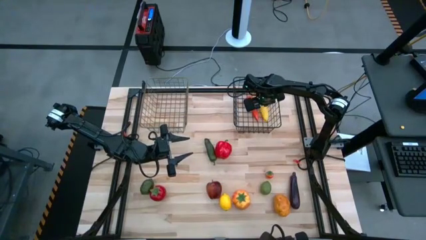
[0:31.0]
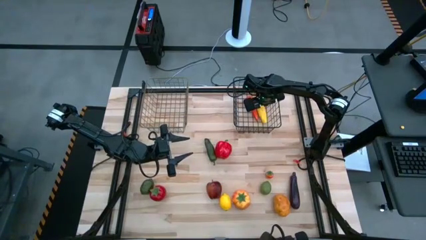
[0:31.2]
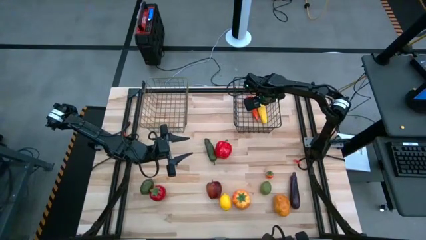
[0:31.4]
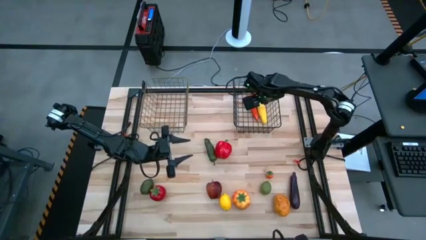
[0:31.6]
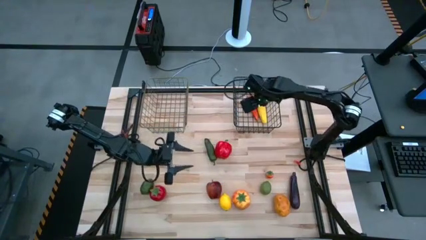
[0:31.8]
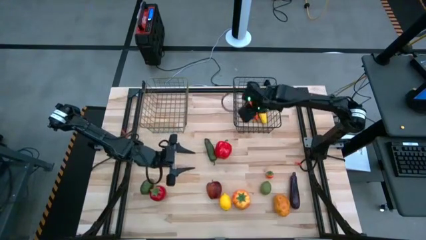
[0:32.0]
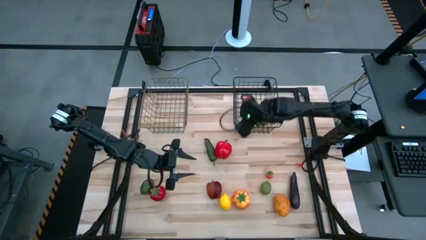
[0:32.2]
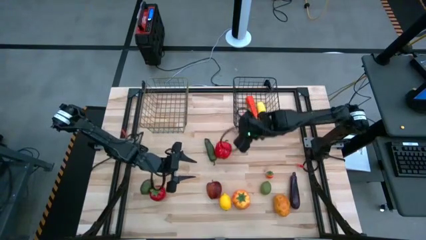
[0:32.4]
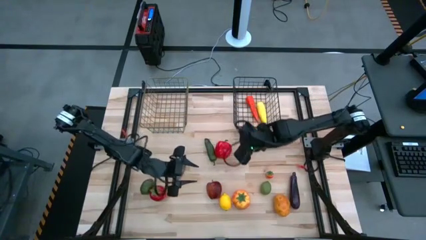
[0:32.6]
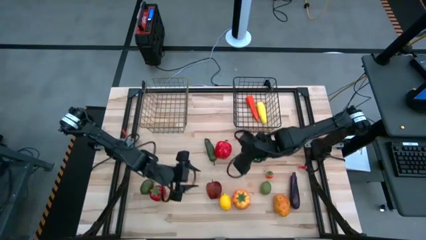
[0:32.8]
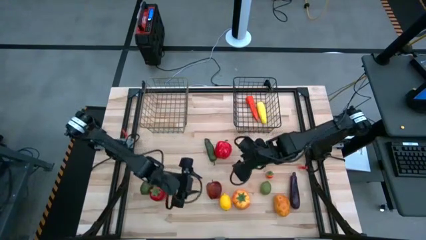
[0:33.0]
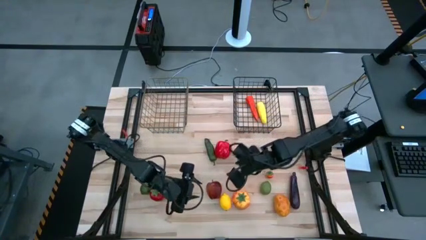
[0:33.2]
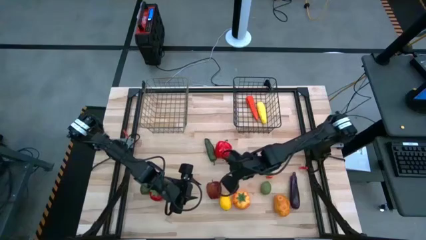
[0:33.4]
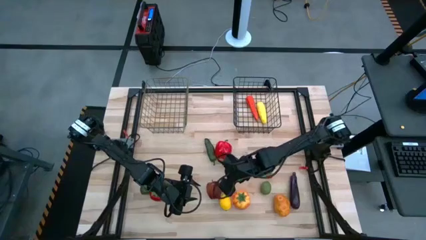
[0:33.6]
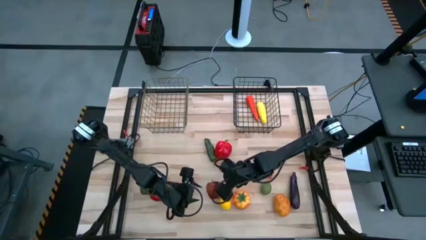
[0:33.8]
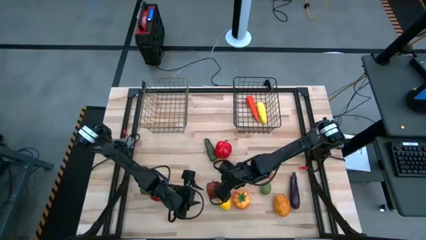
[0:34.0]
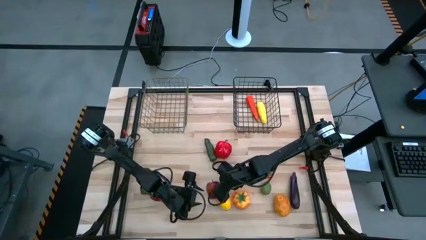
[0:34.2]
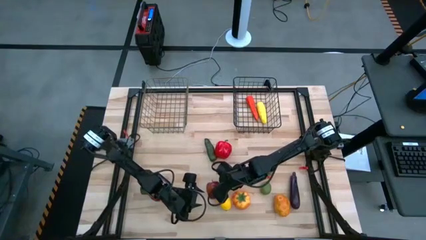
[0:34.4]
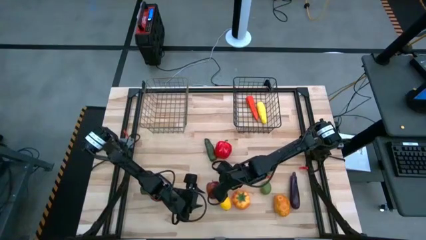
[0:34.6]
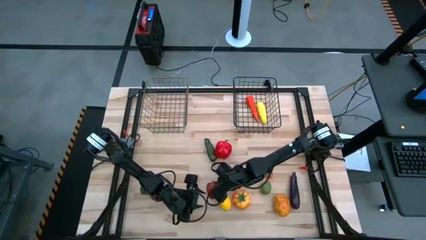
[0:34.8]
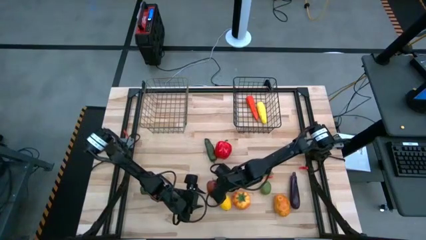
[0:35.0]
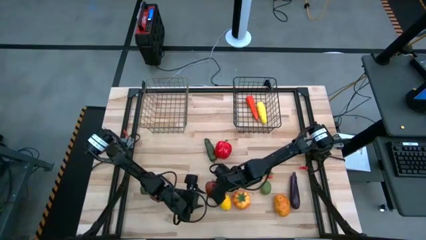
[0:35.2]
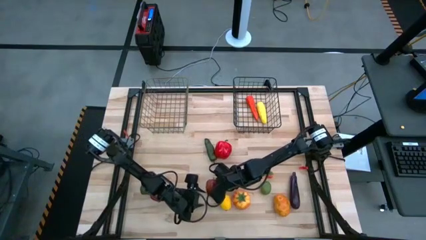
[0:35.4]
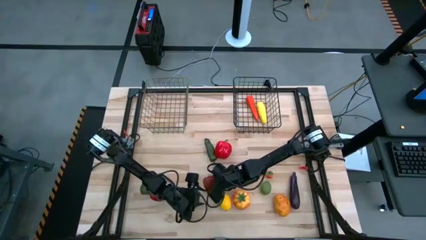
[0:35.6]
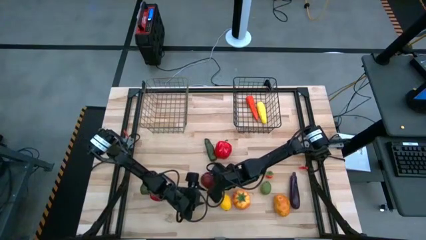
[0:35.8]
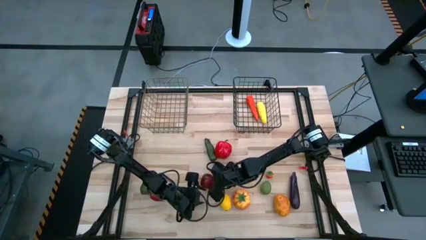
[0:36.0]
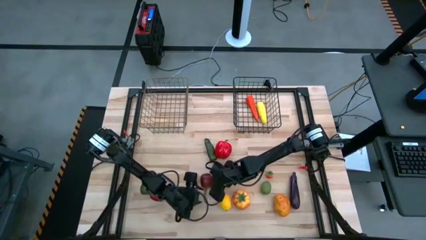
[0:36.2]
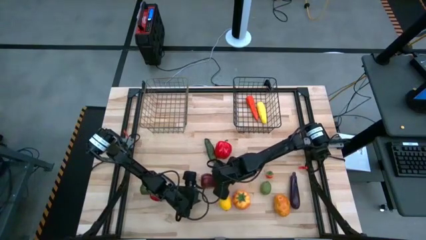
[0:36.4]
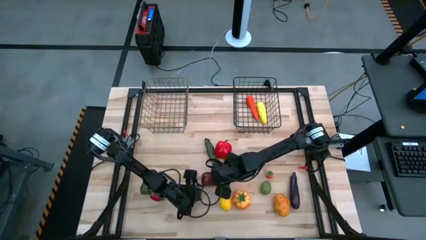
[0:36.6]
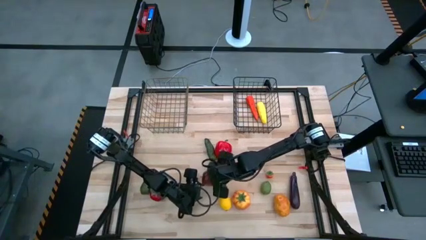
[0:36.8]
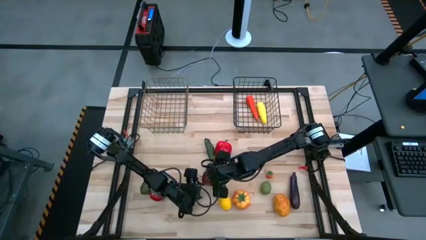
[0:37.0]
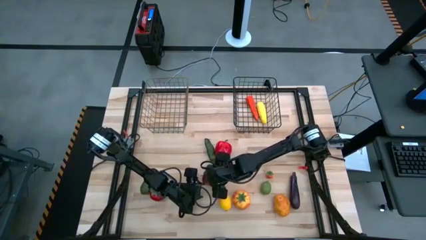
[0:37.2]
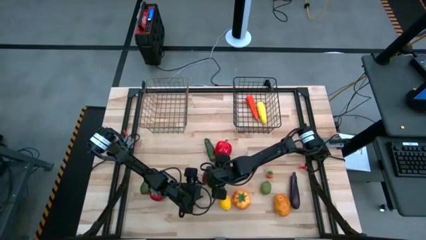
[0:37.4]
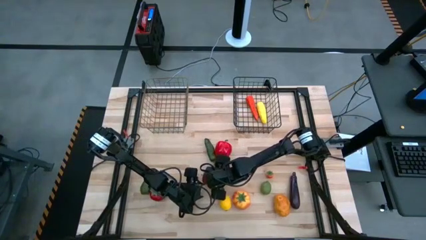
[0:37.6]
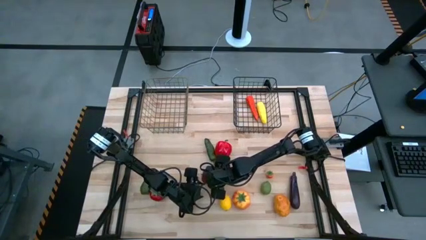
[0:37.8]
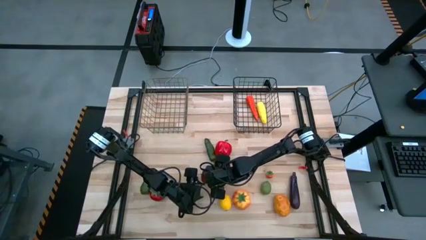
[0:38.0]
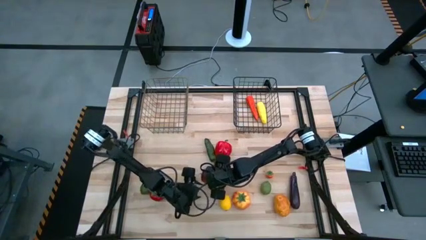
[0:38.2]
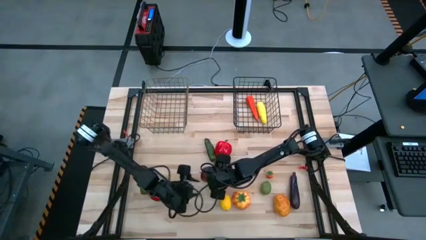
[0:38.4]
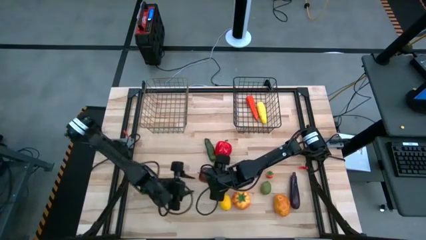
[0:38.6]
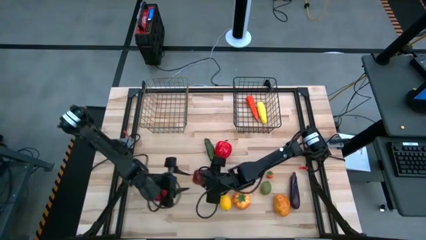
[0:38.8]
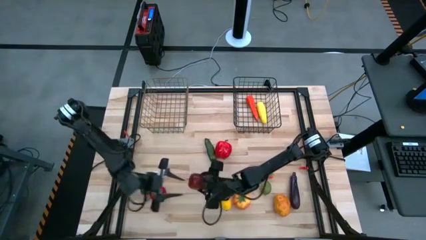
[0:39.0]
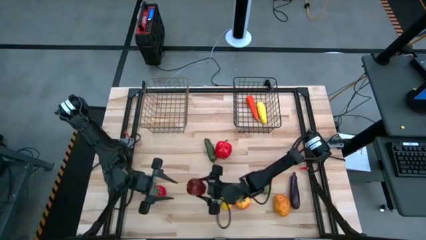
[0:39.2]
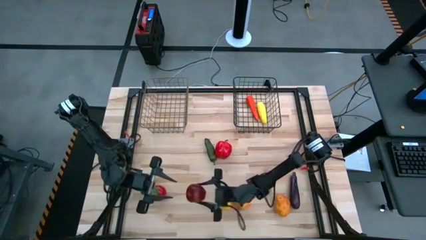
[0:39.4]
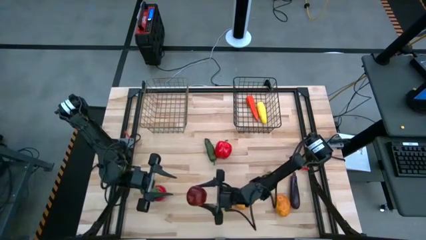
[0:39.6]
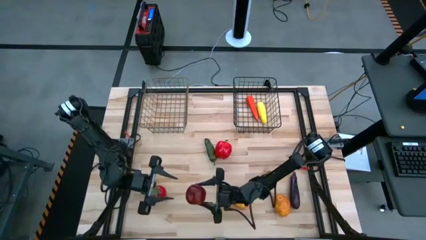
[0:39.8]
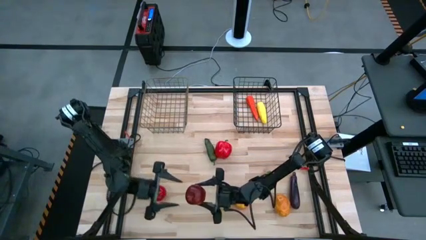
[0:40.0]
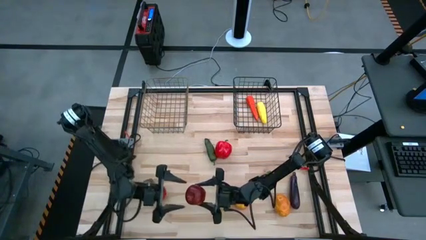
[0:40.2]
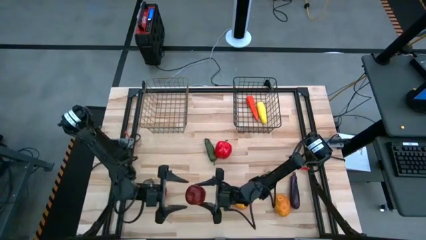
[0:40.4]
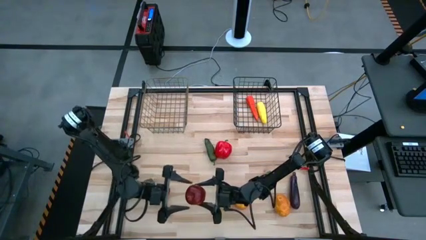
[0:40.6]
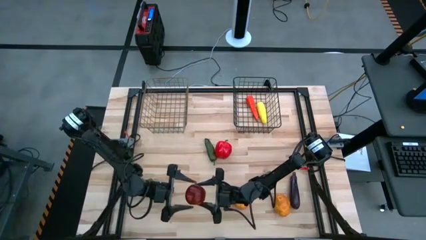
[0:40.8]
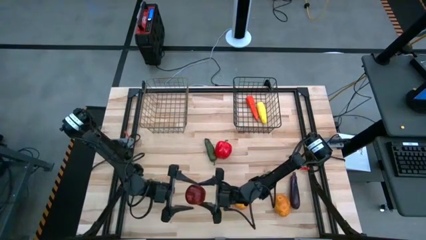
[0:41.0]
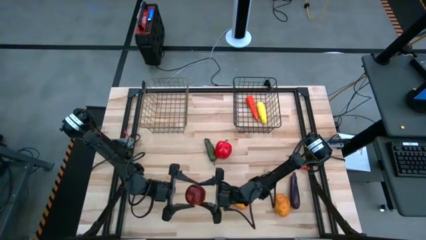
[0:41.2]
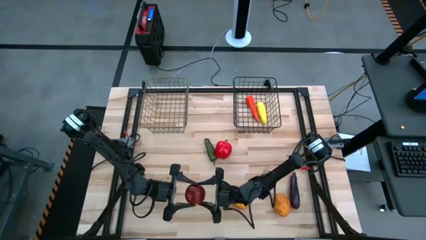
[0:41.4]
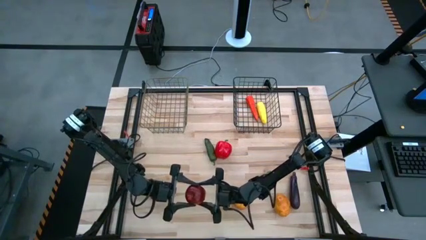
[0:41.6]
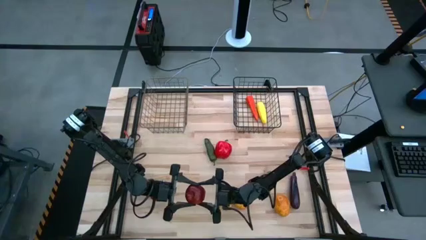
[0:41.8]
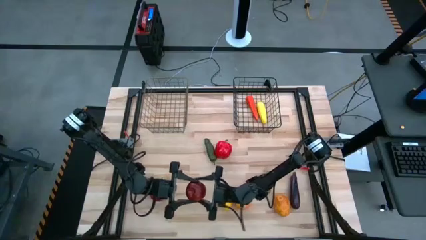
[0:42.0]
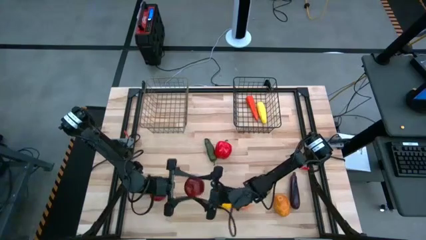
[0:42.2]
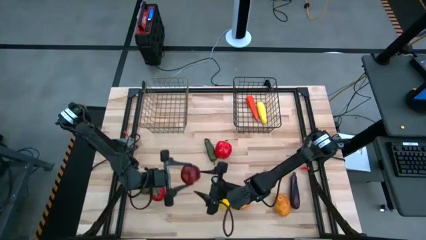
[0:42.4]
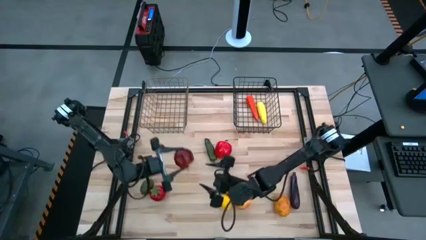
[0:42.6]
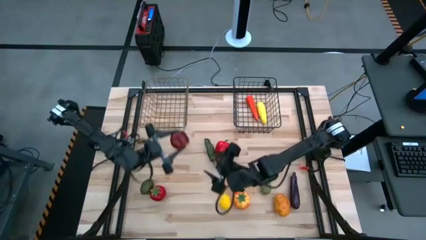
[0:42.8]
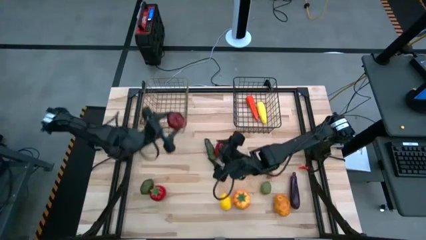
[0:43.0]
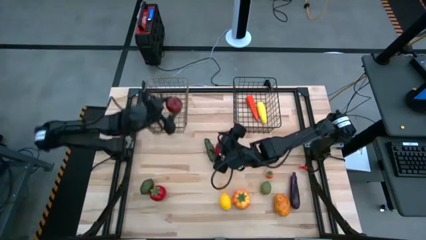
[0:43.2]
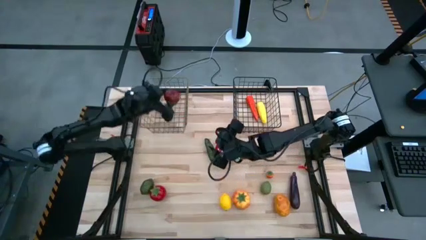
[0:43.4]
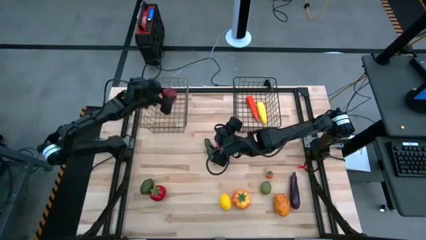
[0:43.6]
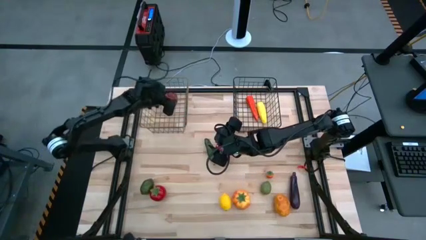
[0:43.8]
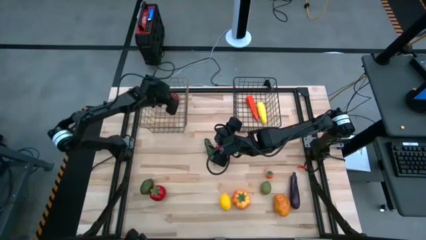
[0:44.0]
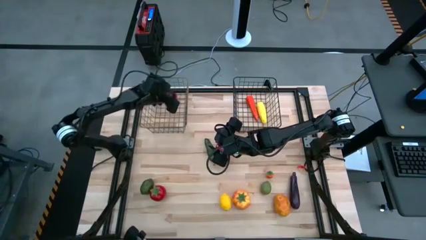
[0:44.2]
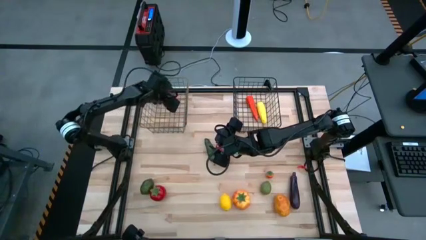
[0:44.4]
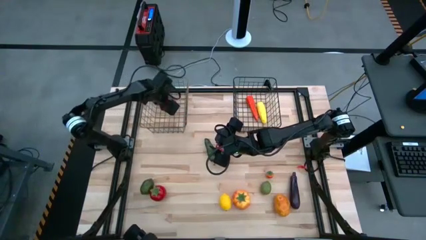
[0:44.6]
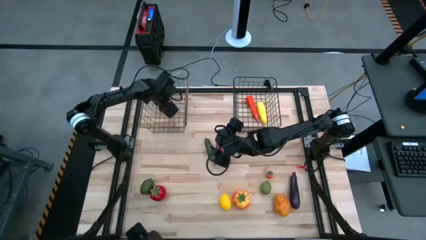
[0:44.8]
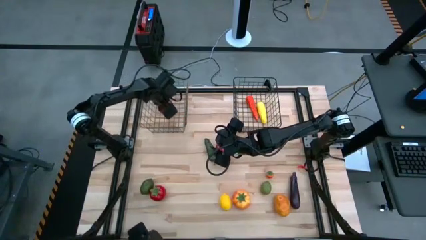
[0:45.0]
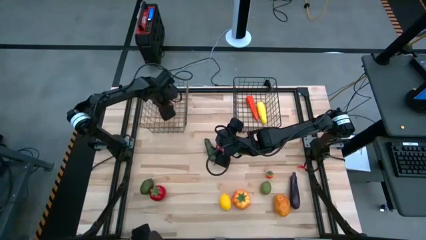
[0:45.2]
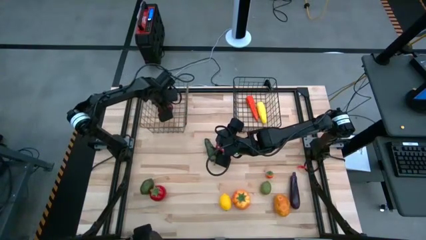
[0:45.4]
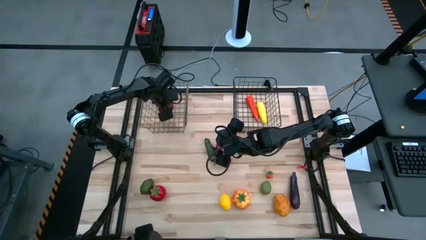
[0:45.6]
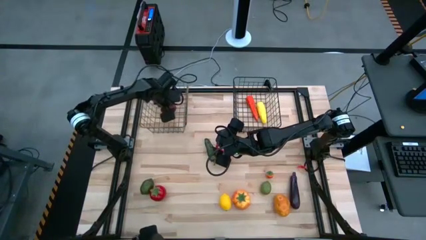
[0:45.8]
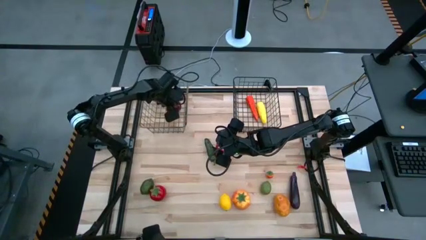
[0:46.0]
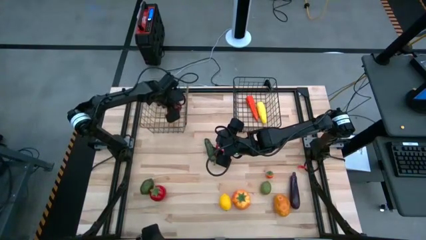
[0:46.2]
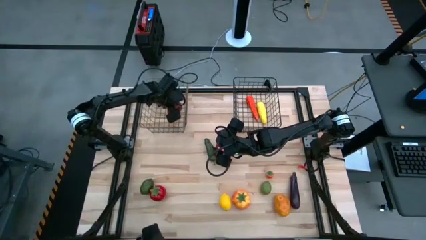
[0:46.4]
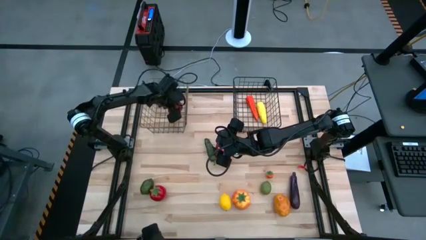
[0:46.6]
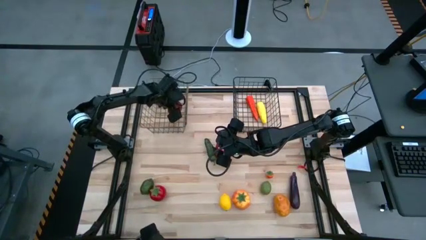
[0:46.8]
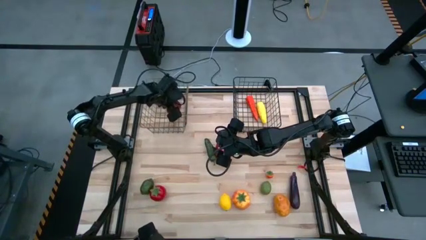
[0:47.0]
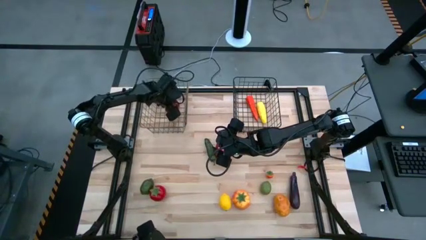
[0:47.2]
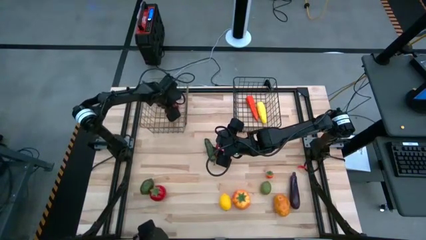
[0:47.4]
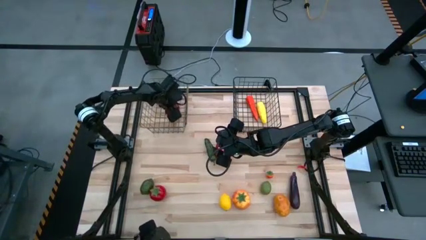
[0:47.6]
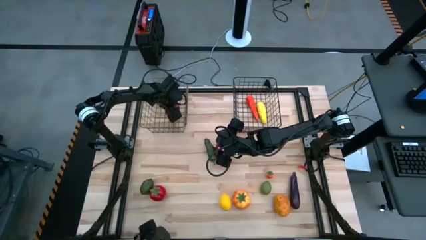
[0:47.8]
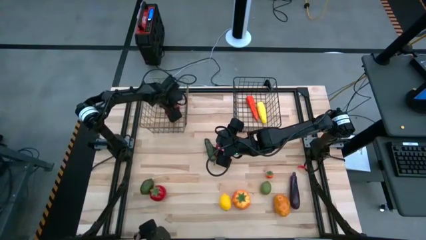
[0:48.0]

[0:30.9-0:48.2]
Task: Sort produce into baskets
Put the apple into the left yellow wire basket
